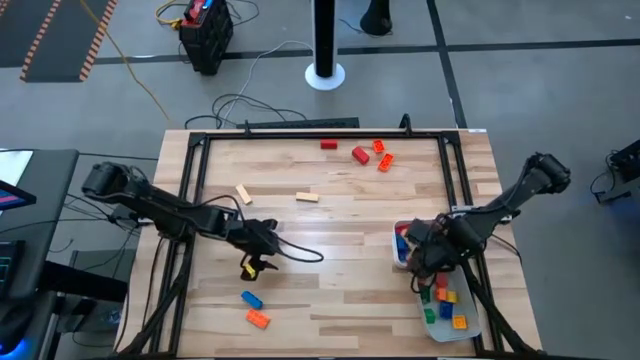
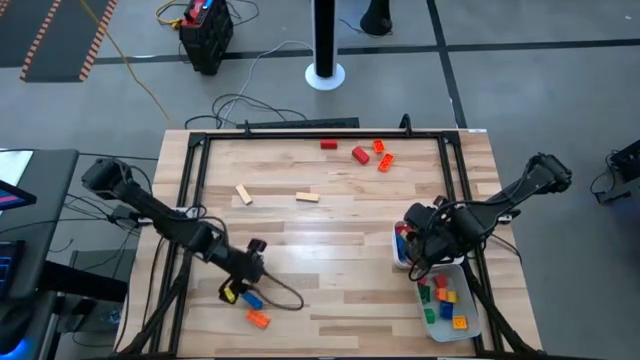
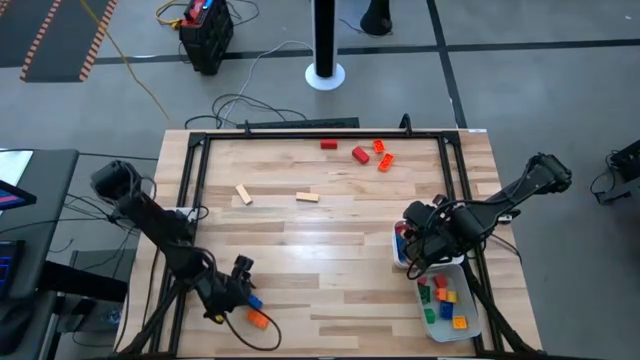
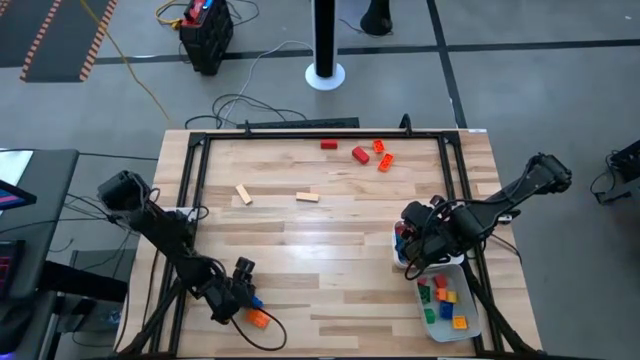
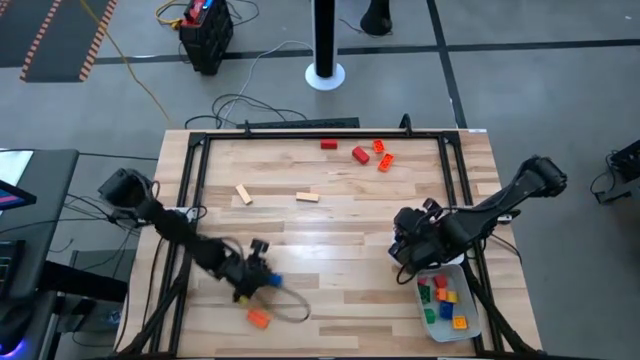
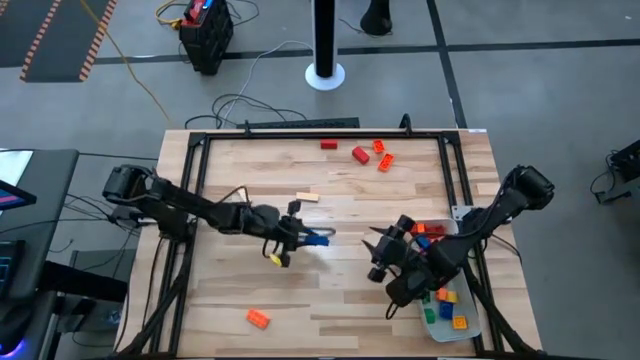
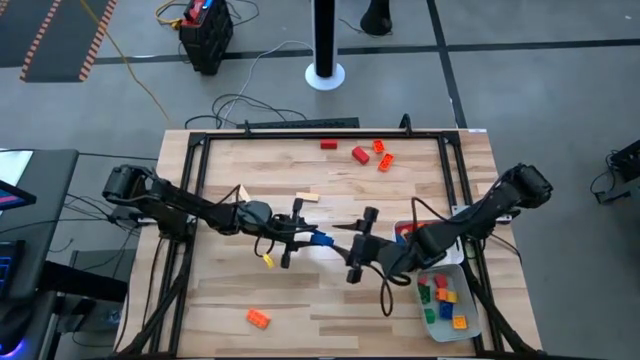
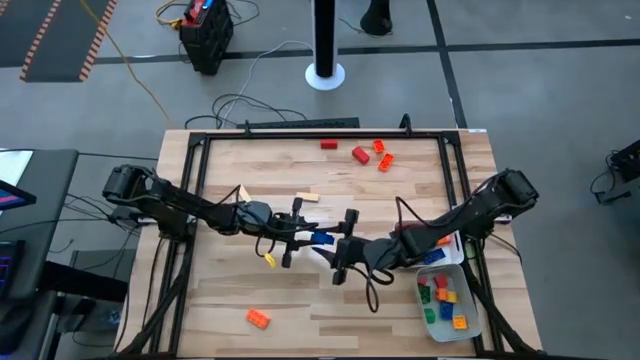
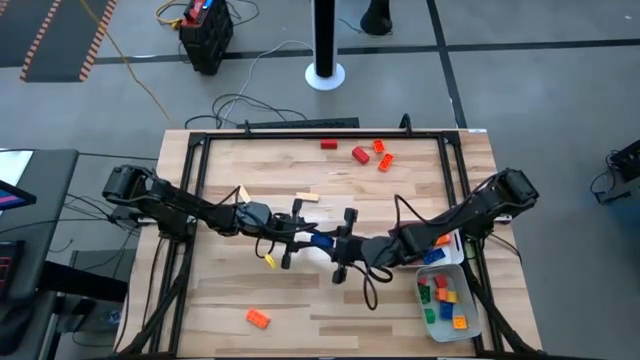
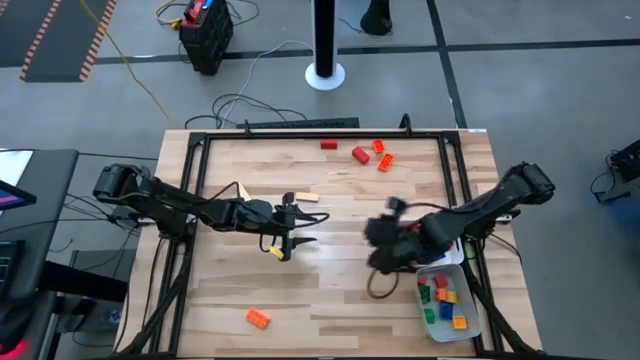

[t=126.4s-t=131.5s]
Task: Sort blocks by size
Put the 8 stud blue game piece into the white bin

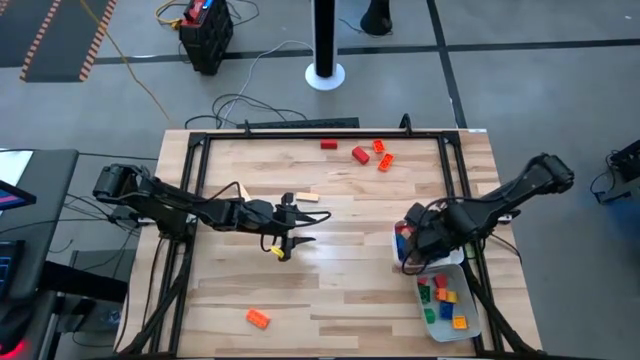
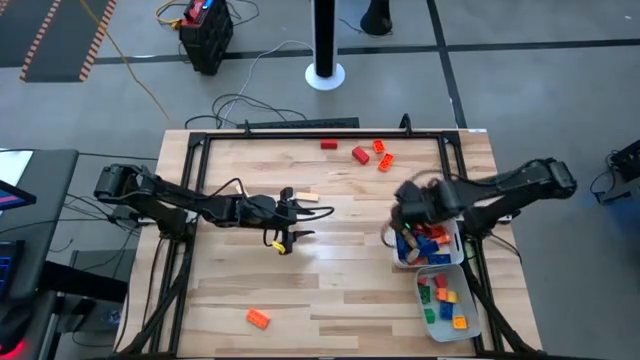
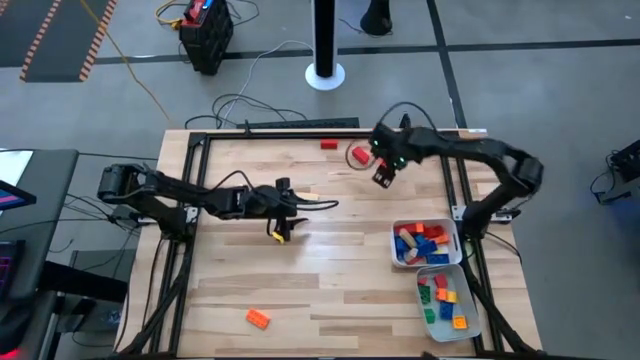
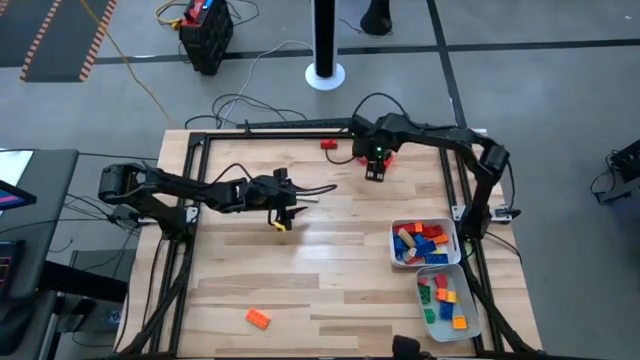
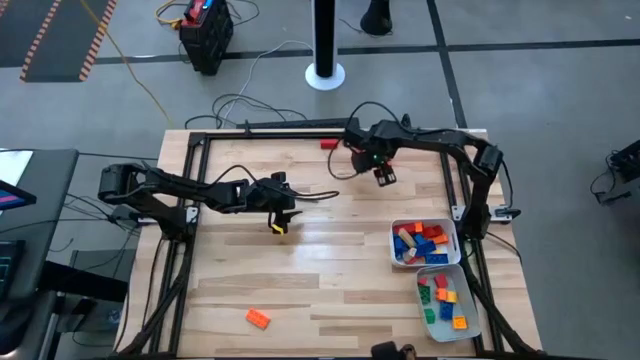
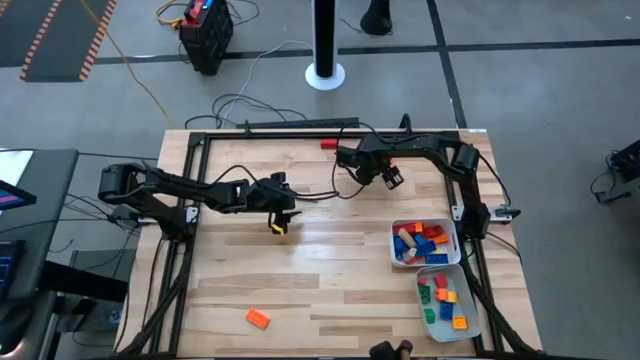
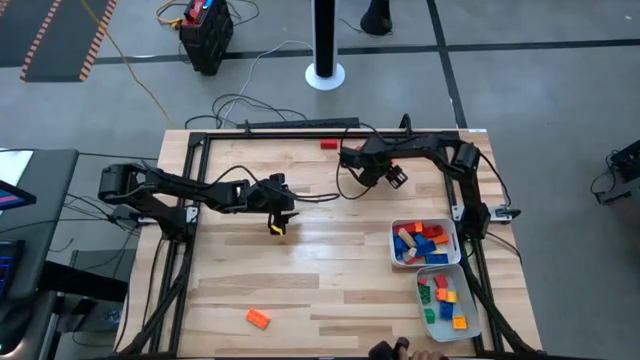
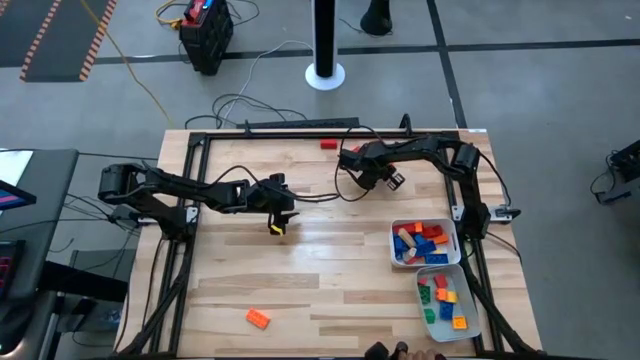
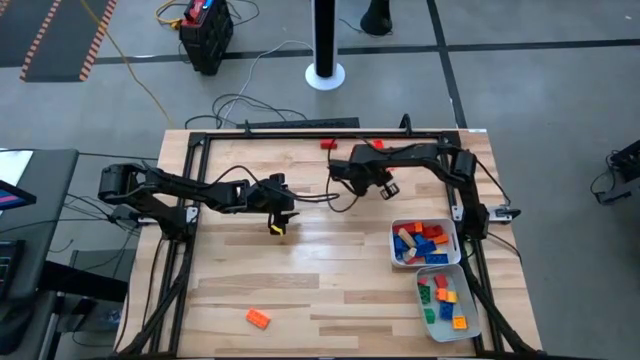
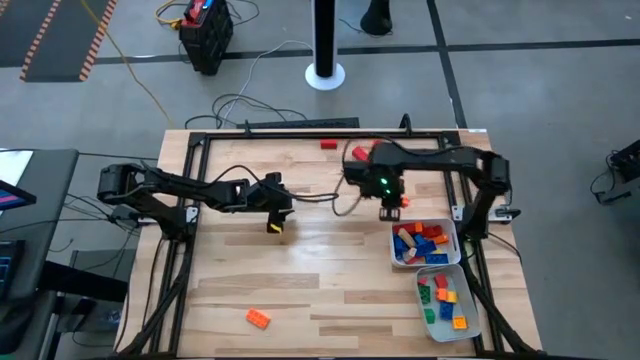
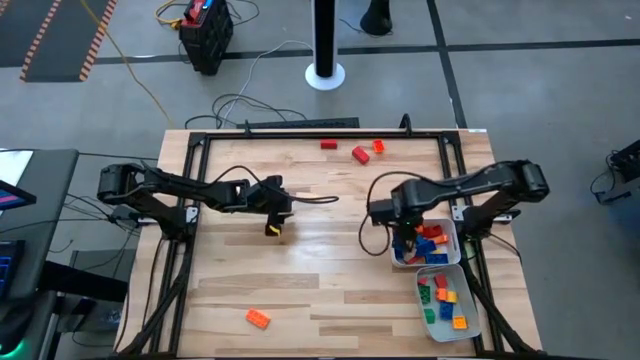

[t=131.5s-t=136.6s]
Put the 8 stud orange game piece into the white bin

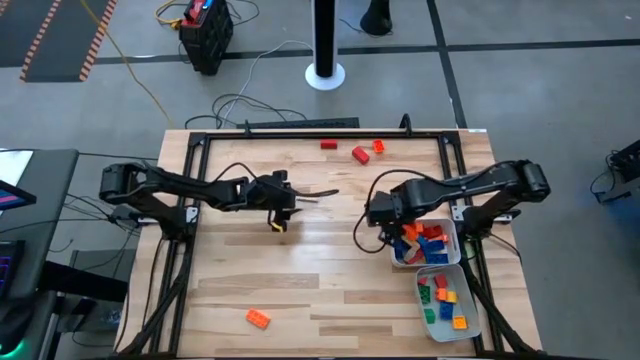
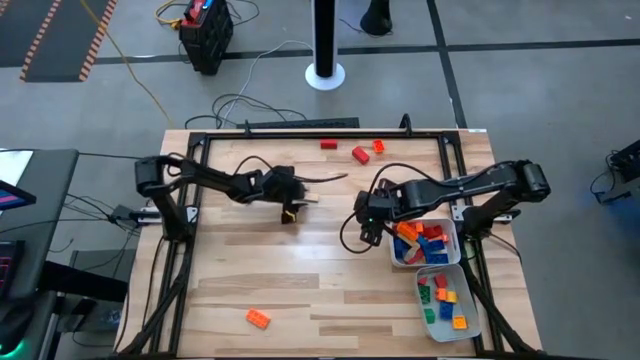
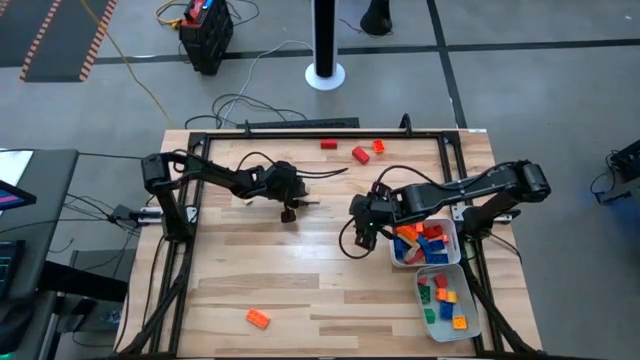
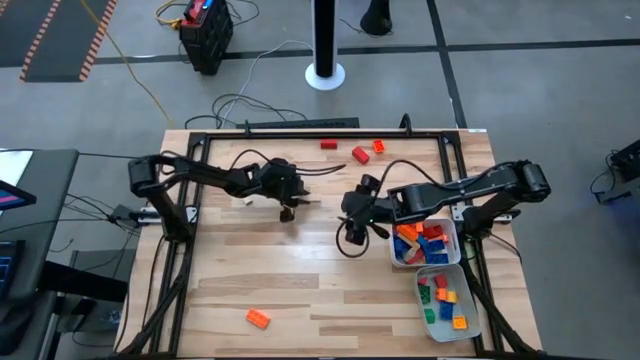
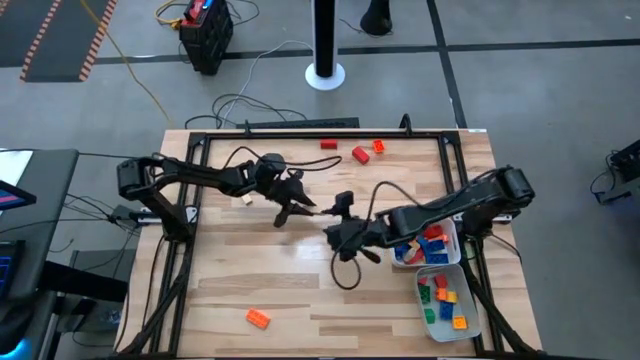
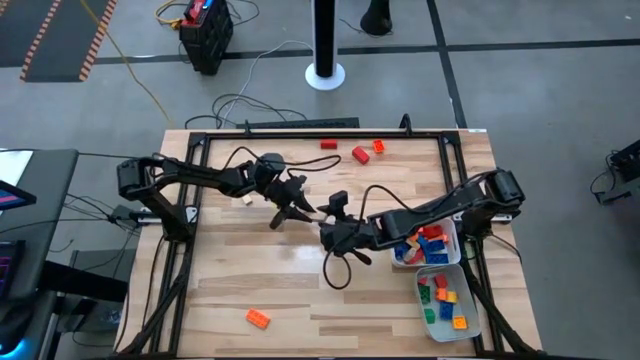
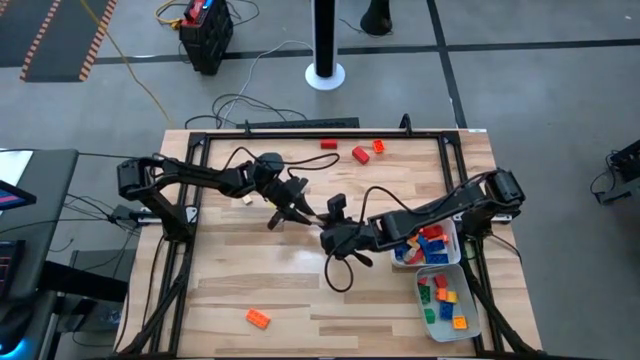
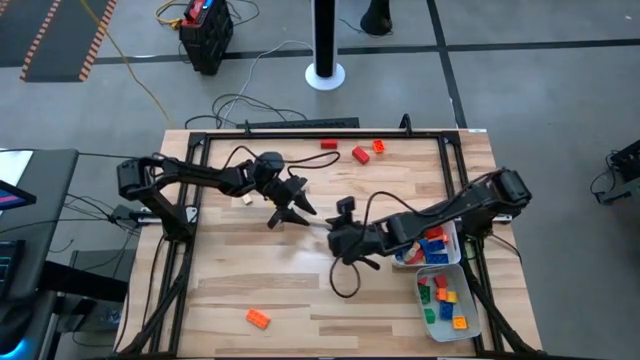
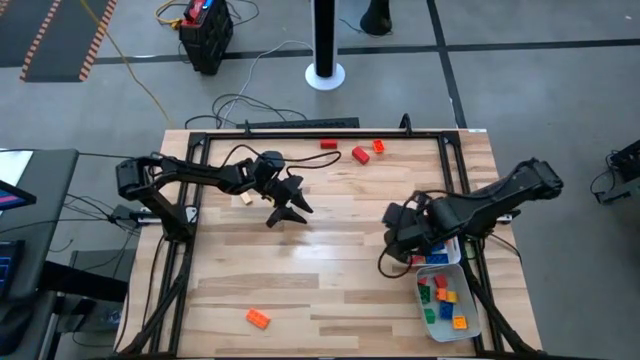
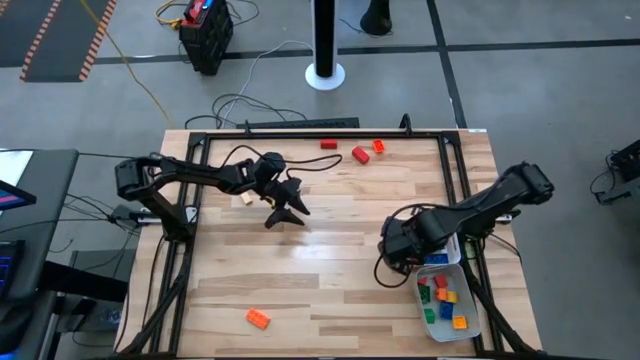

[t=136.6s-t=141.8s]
Put the wooden block into the white bin

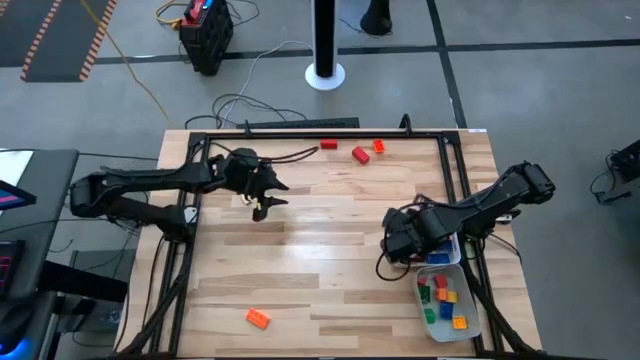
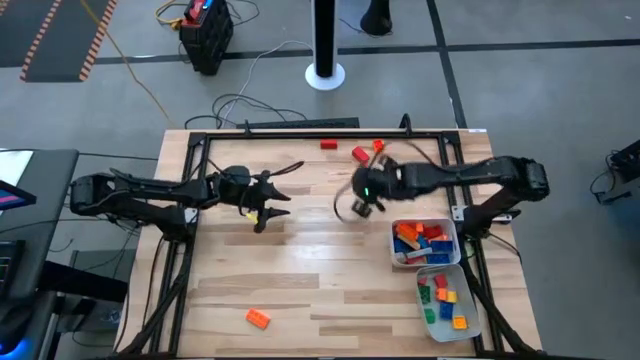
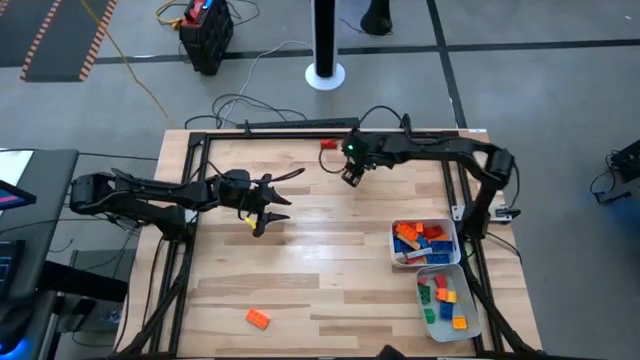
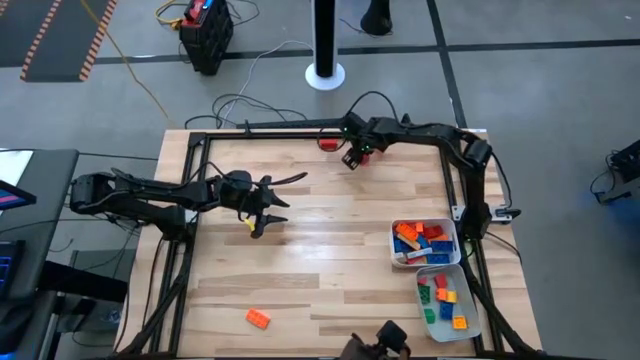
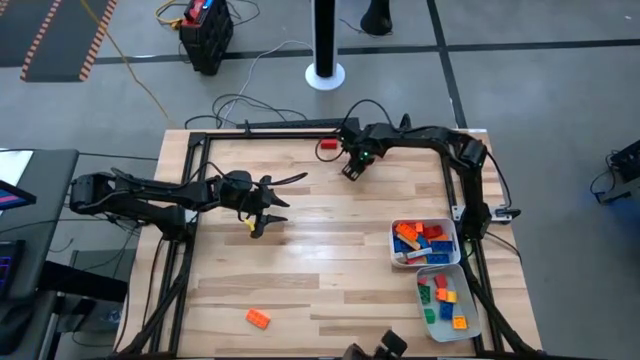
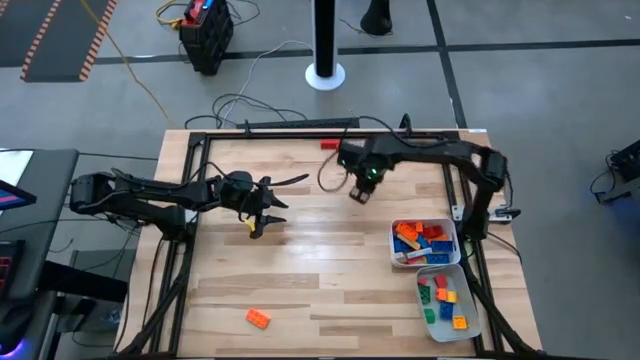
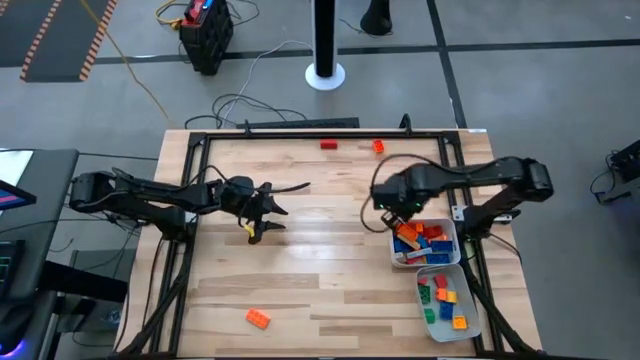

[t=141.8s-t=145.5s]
Put the red block into the white bin

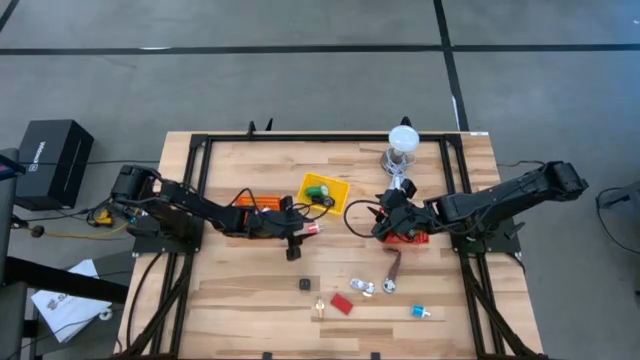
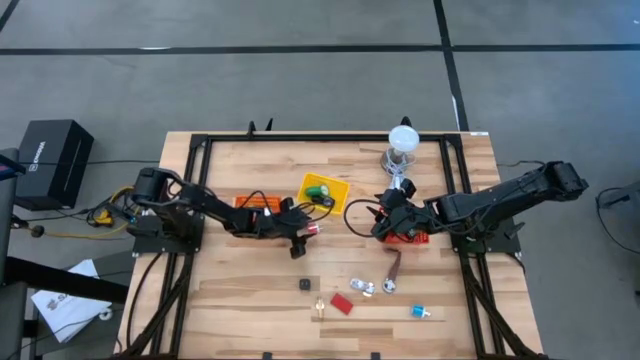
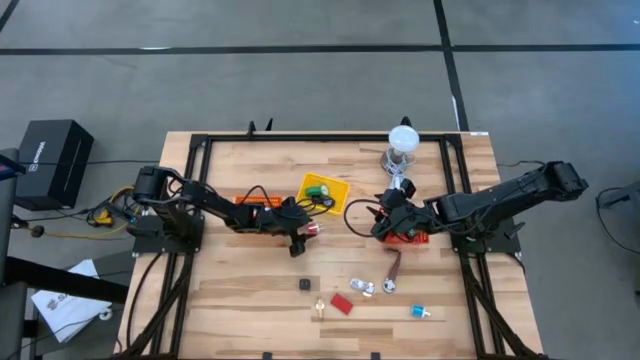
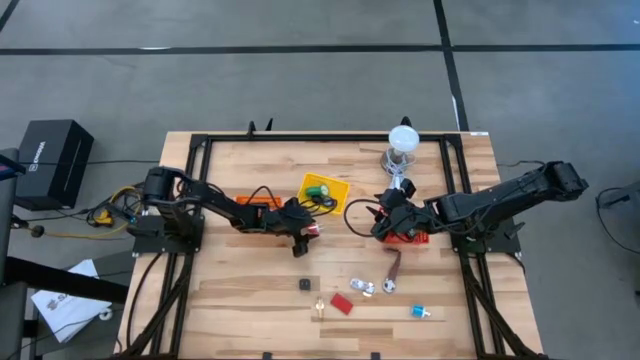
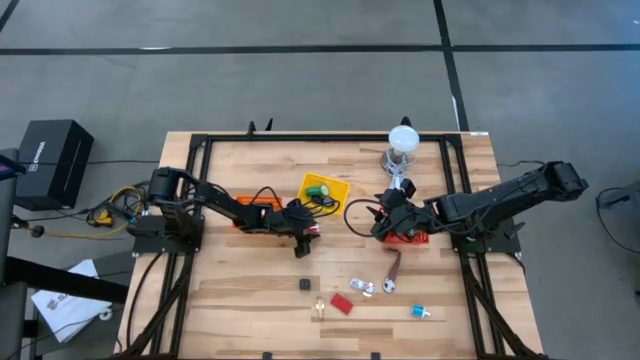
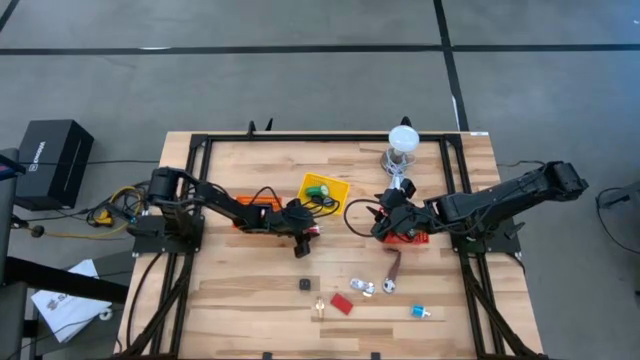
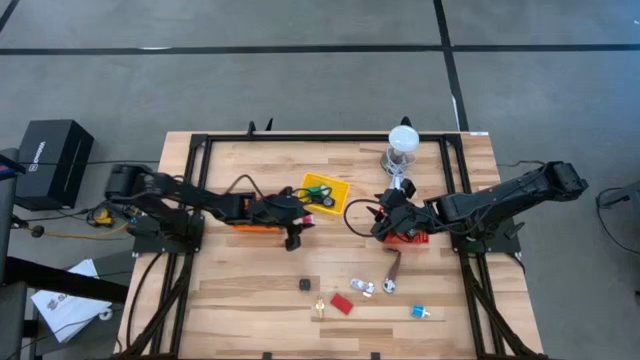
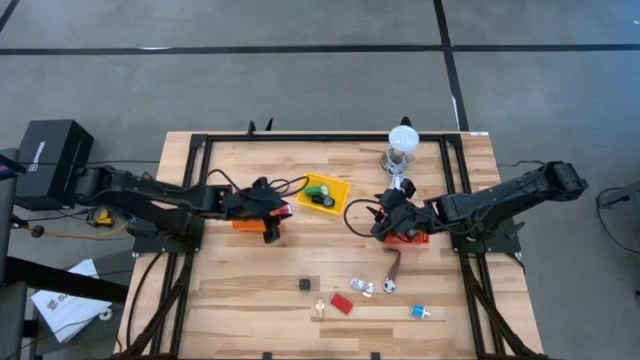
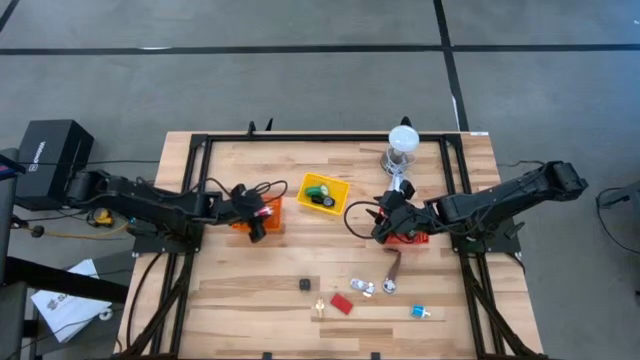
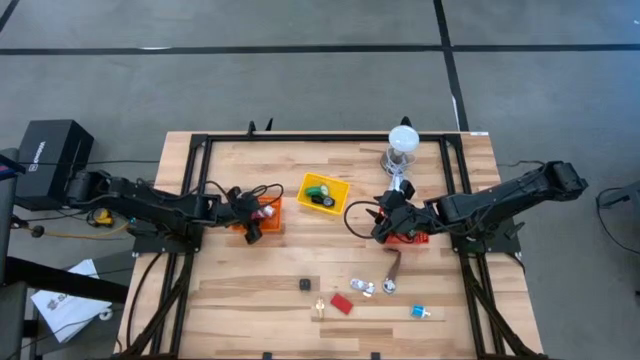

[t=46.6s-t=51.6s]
Task: Pick & Place Office items
Put the red charging adapter into the orange bin
